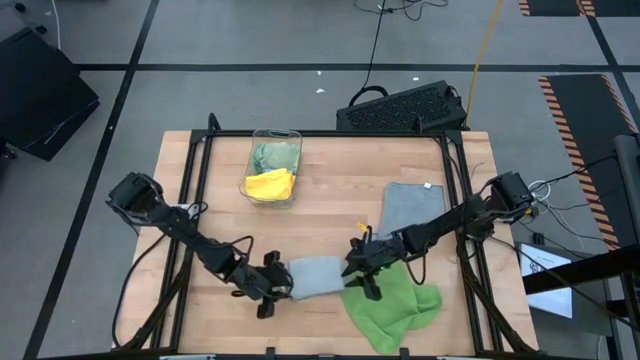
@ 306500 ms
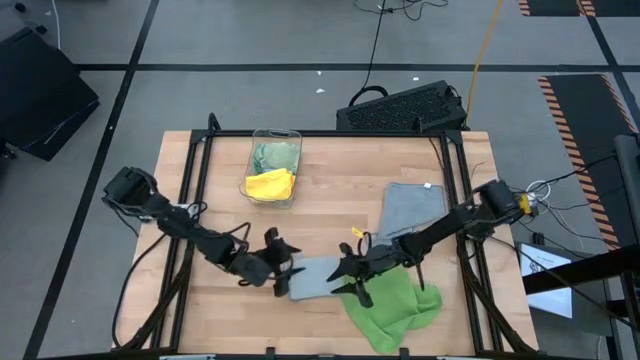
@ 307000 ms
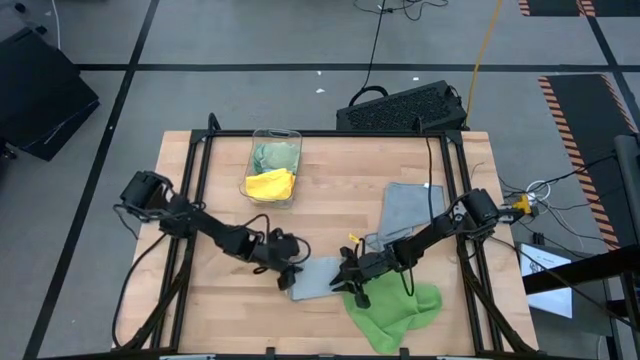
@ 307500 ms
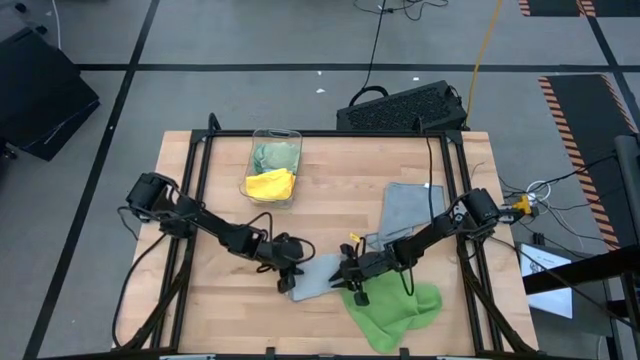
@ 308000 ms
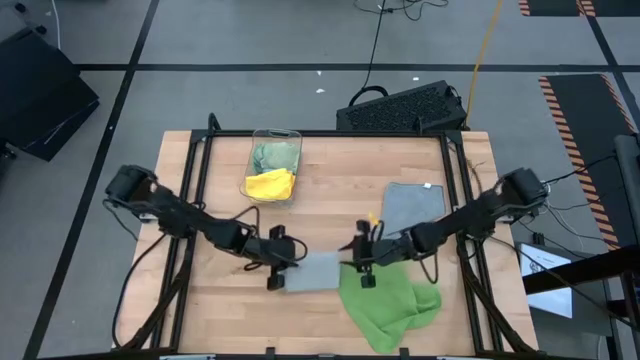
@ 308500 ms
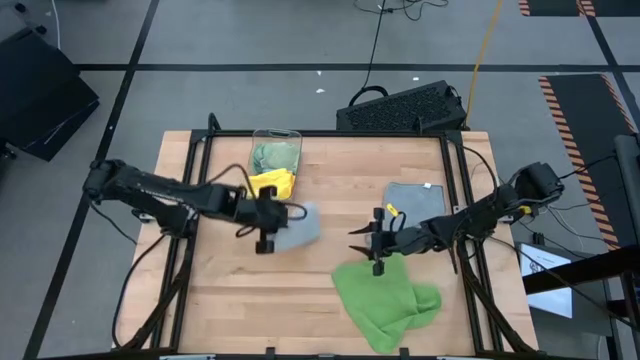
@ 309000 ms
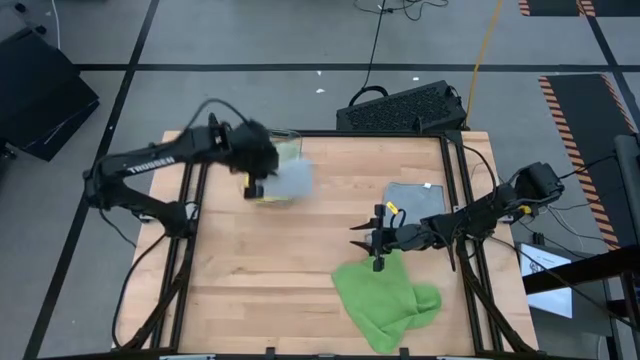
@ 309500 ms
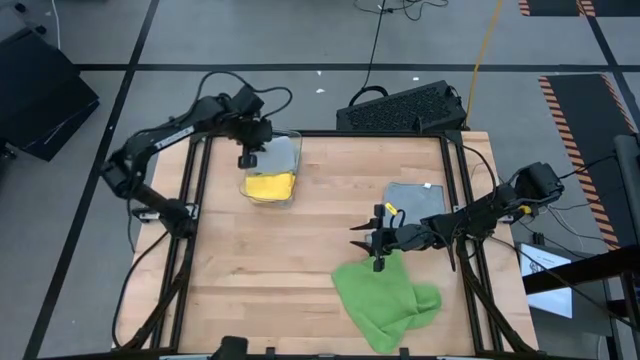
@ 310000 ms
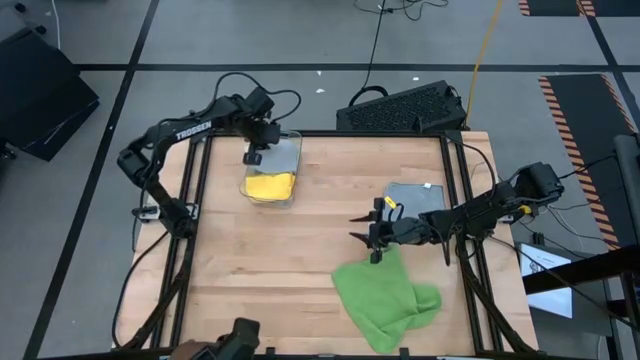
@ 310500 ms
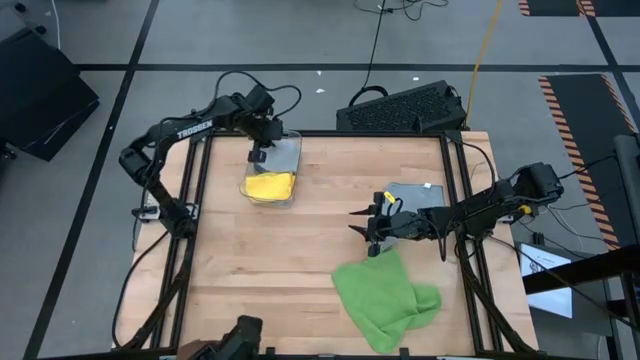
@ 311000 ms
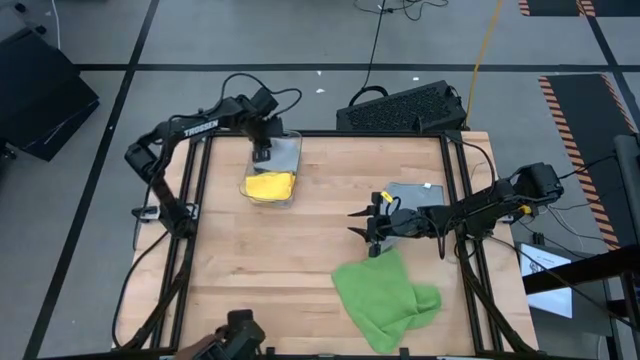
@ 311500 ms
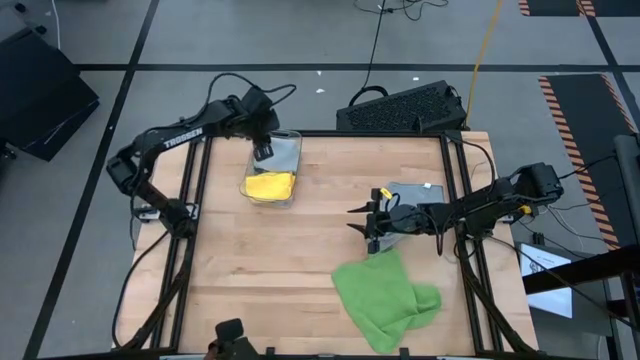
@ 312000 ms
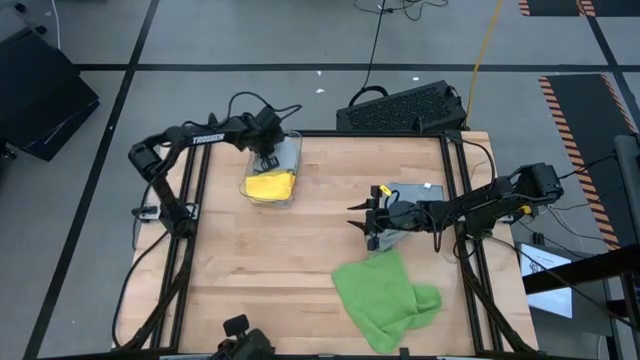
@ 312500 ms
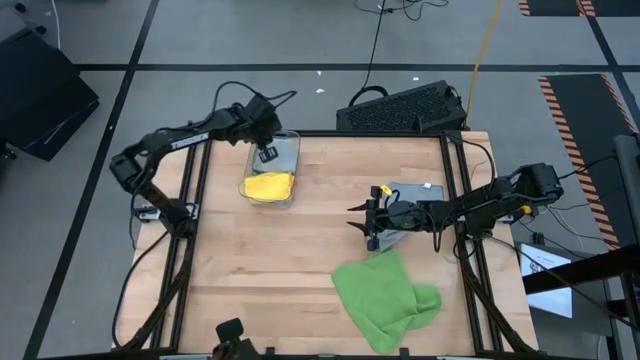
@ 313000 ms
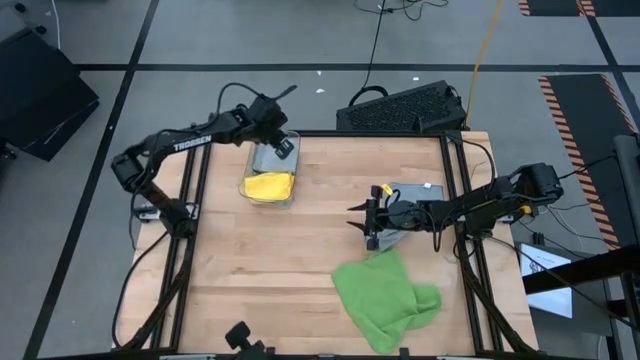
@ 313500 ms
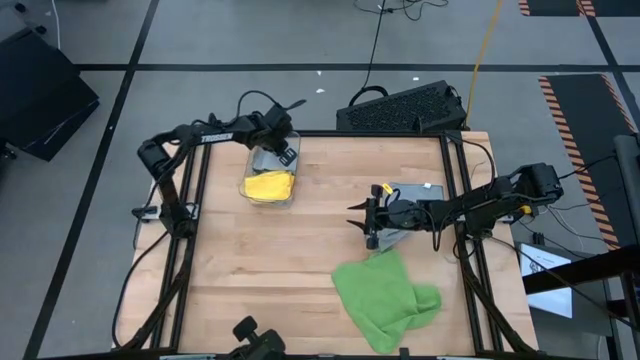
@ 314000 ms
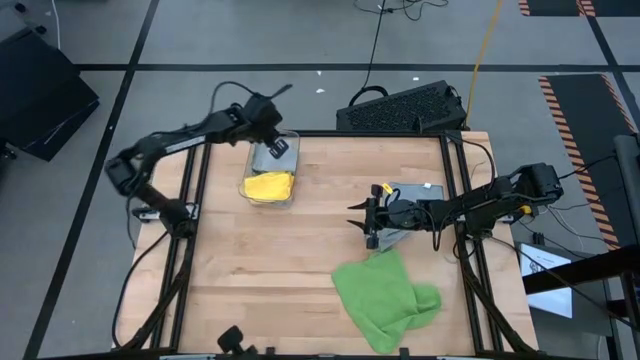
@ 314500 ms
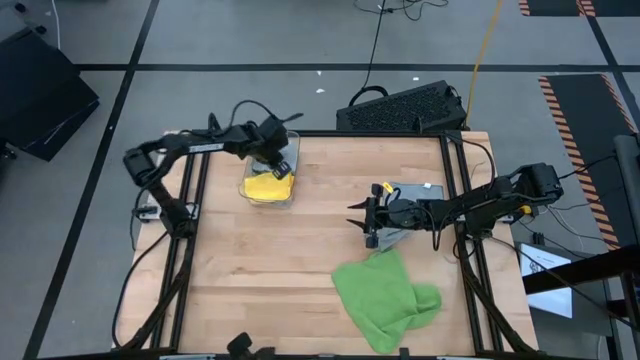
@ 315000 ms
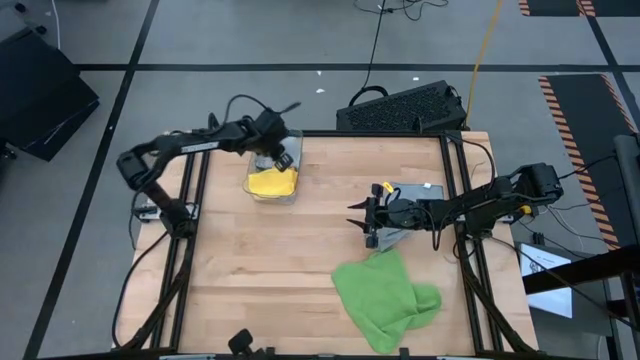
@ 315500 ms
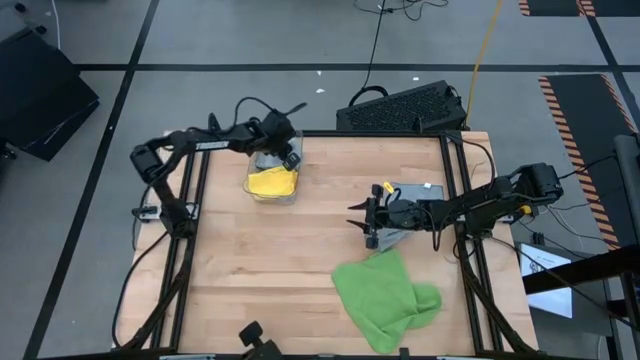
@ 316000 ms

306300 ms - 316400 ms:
Task: Fold microfiber towels
Put the center gray microfiber cloth into the transparent bin

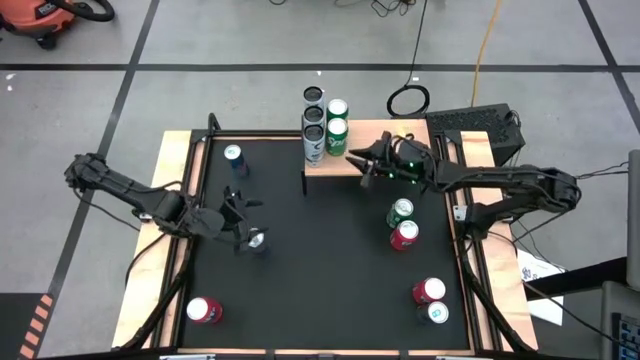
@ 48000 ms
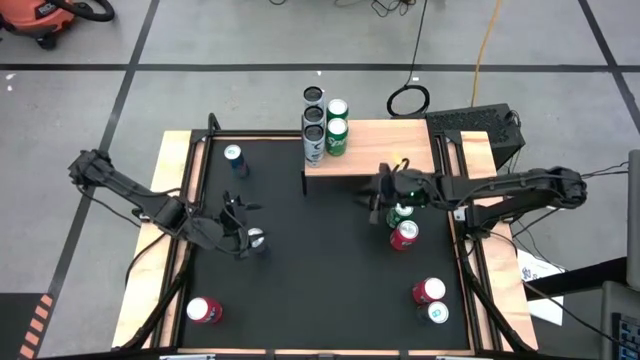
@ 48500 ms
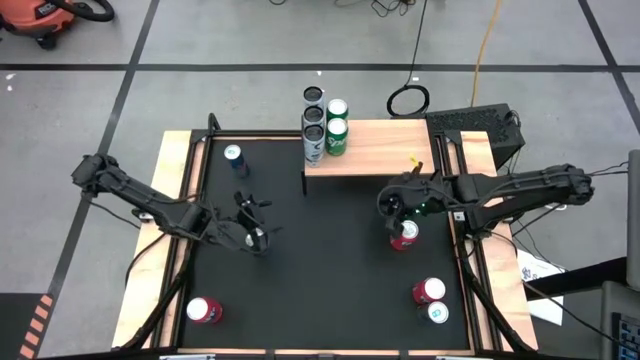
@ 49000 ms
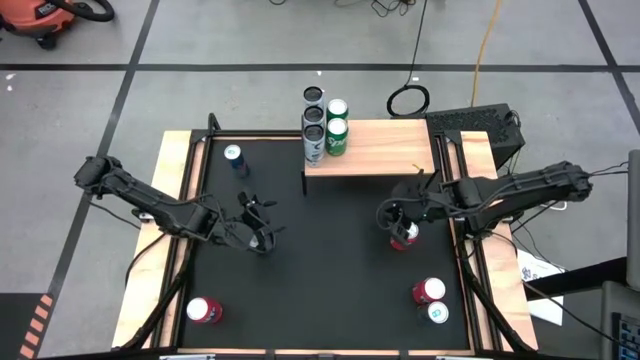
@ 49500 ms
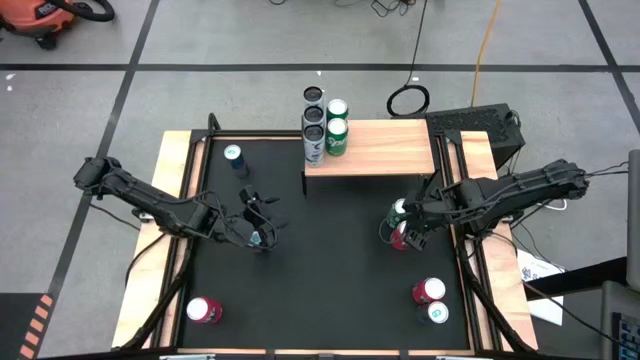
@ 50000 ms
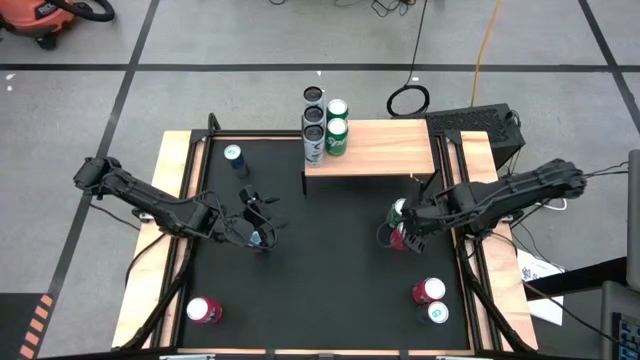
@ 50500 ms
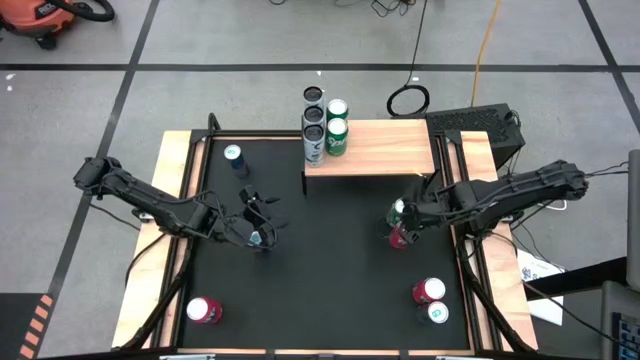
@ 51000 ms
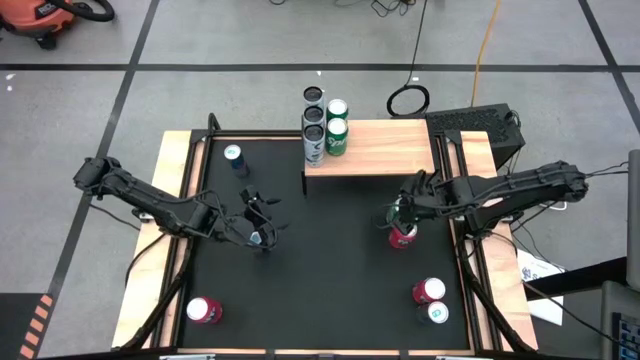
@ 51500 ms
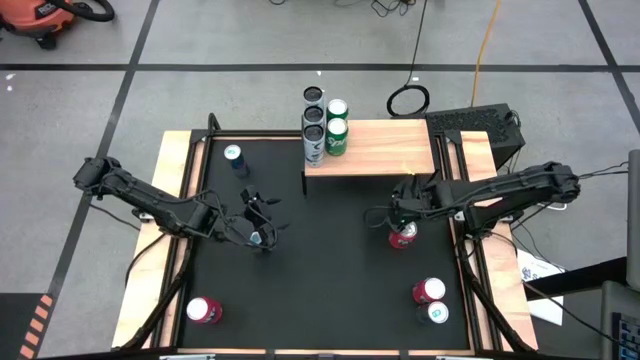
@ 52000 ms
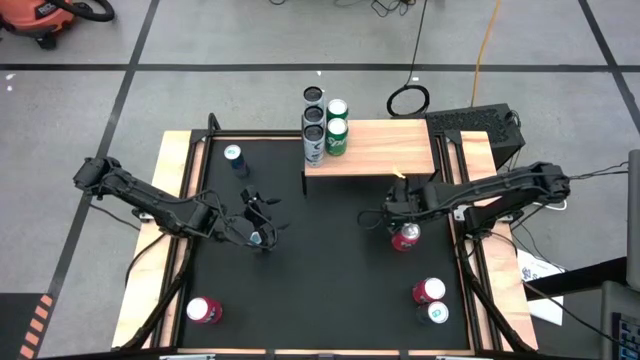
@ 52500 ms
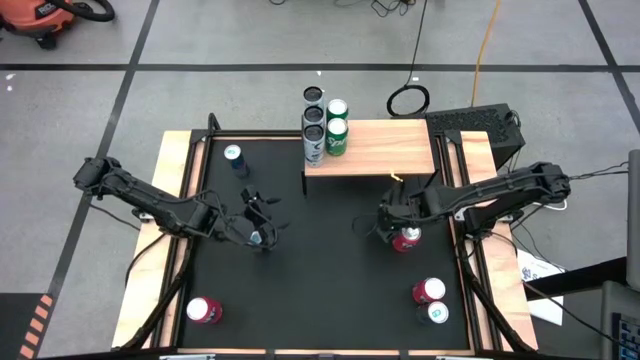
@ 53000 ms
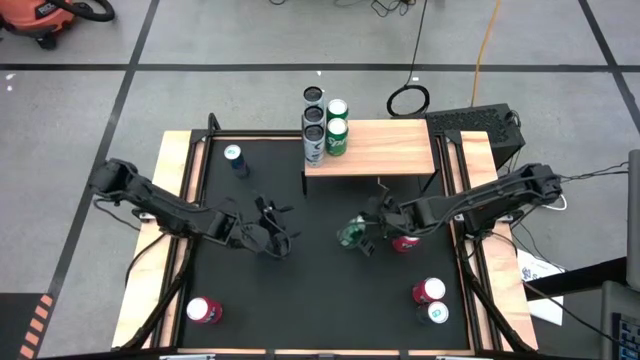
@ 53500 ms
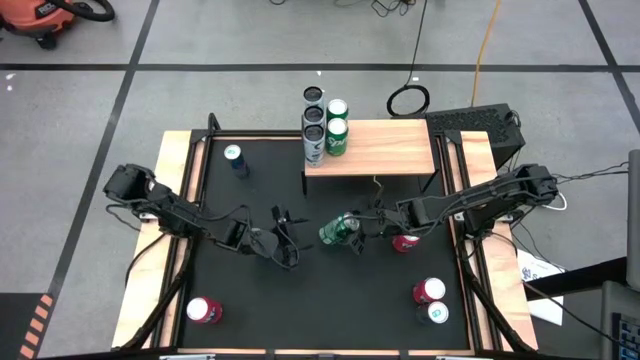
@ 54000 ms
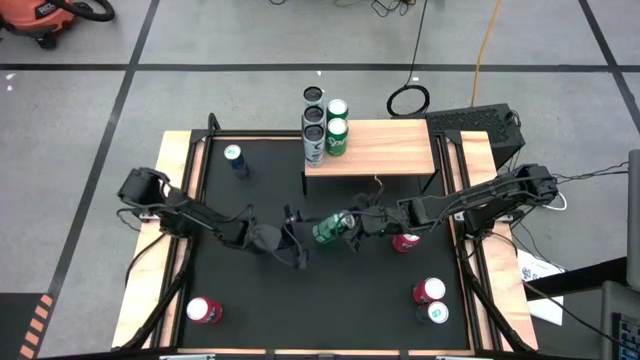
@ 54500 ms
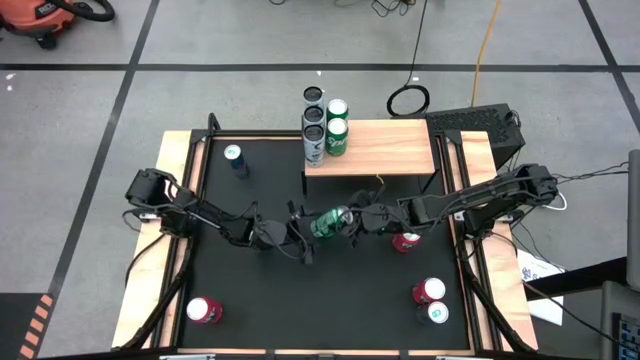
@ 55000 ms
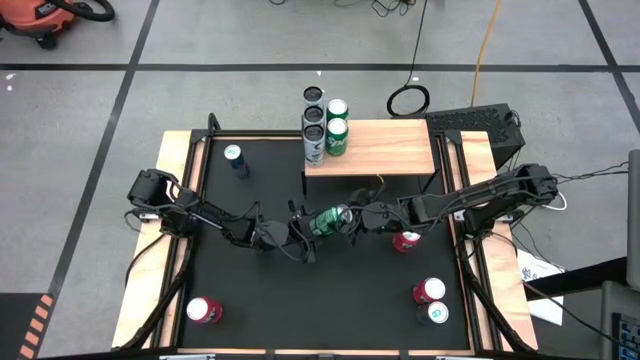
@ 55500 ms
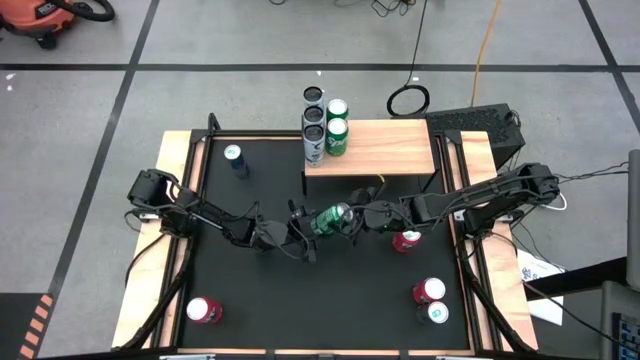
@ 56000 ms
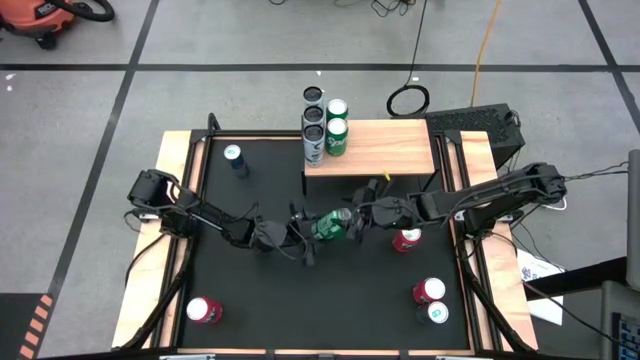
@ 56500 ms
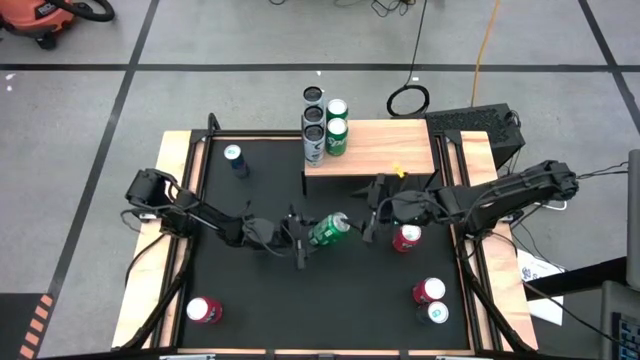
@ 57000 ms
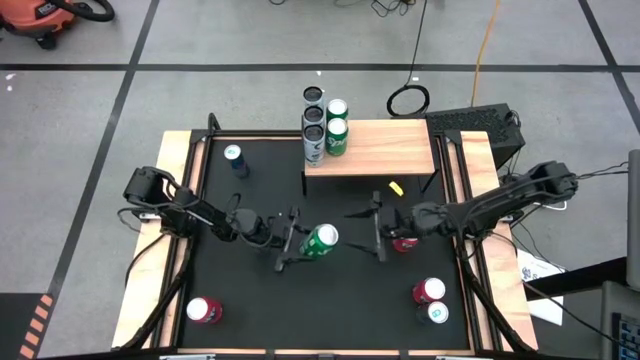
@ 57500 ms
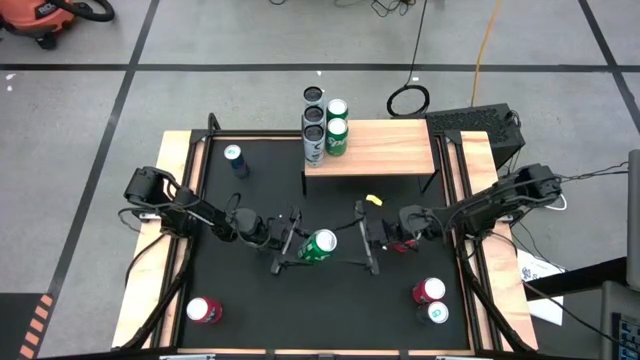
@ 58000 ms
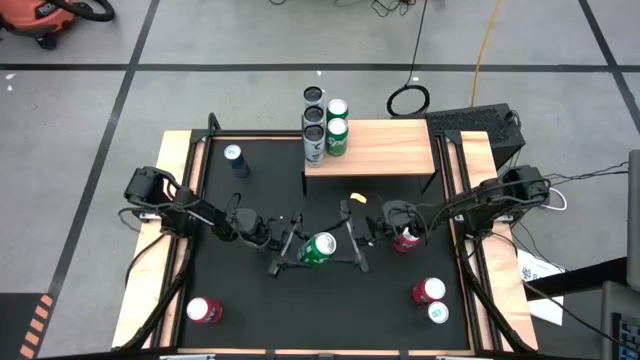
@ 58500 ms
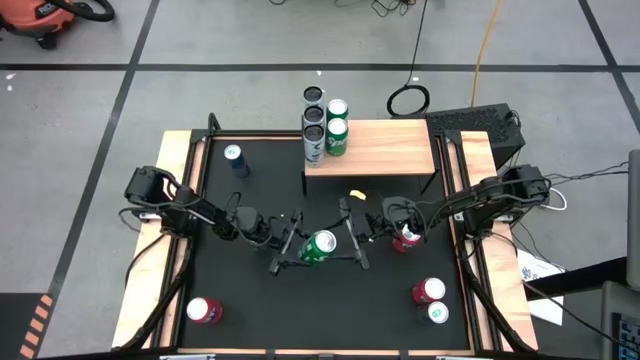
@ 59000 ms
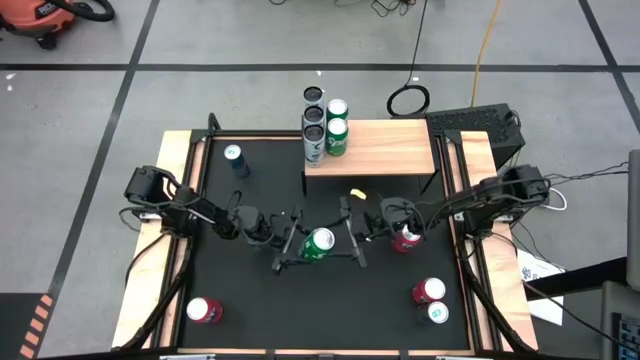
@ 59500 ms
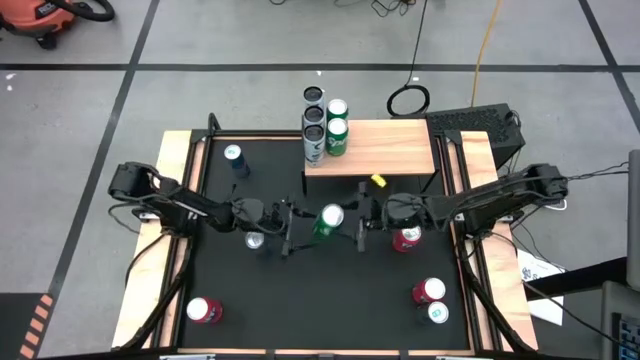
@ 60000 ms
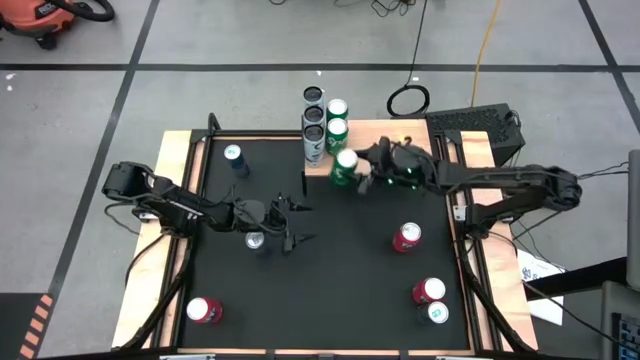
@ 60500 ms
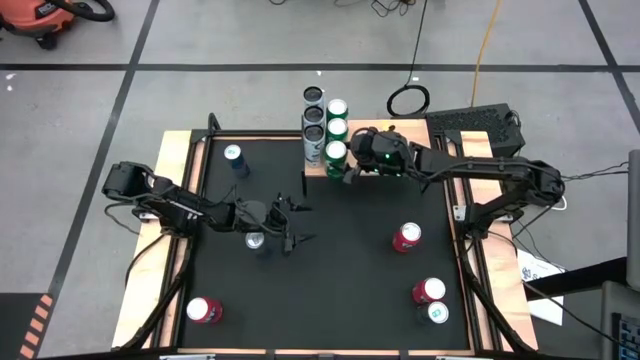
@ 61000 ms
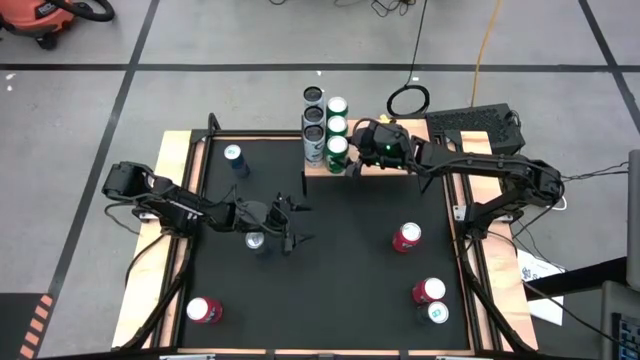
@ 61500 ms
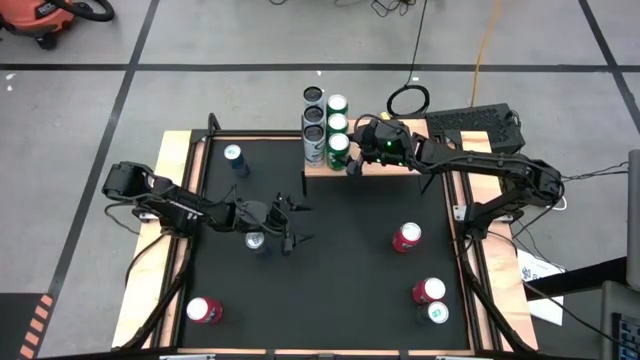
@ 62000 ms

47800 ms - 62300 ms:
Task: Place canned beverage on shelf
Put the green soda can on the shelf aligned with the other green soda can
